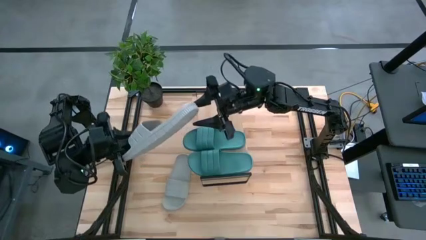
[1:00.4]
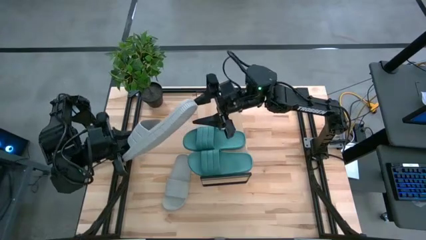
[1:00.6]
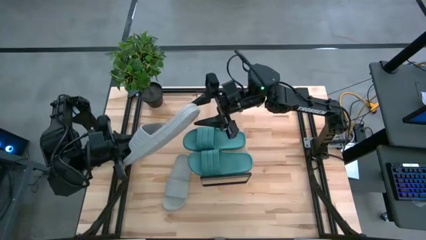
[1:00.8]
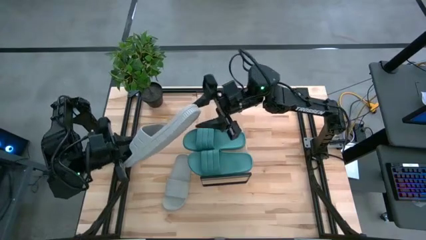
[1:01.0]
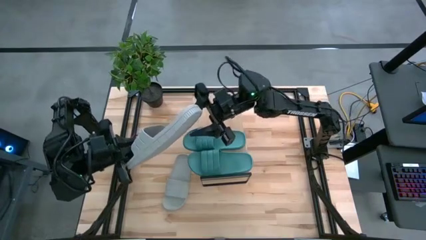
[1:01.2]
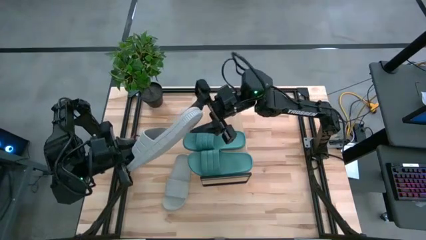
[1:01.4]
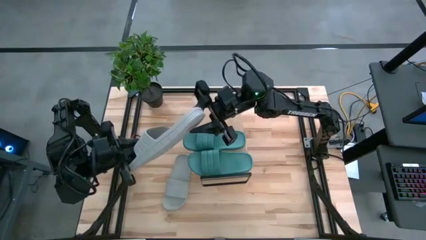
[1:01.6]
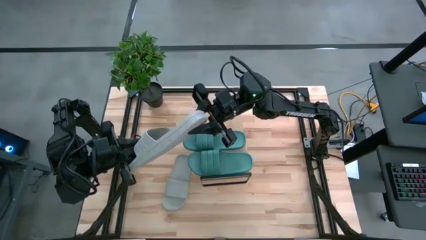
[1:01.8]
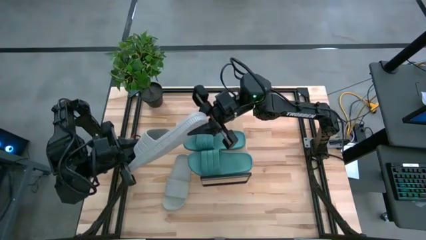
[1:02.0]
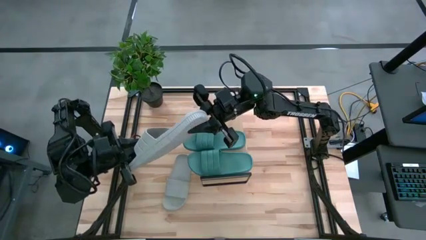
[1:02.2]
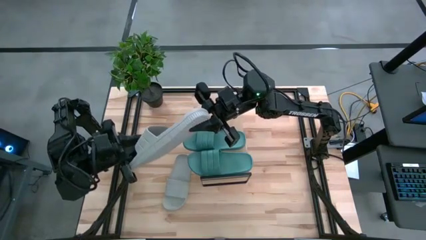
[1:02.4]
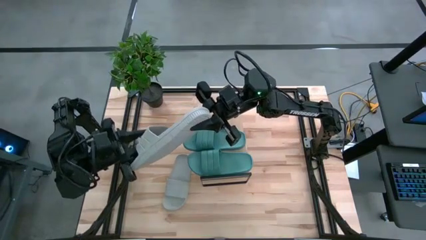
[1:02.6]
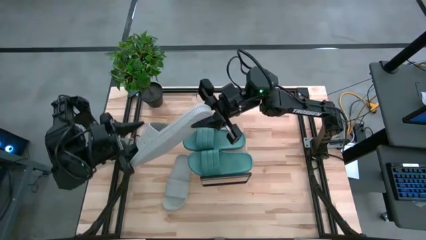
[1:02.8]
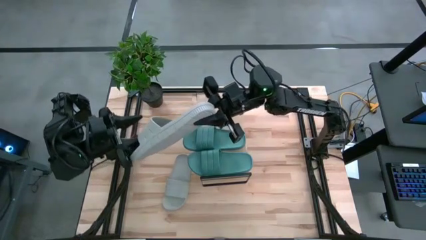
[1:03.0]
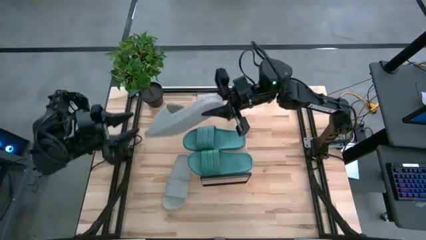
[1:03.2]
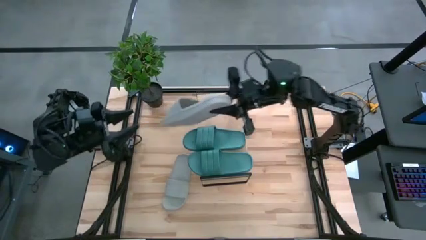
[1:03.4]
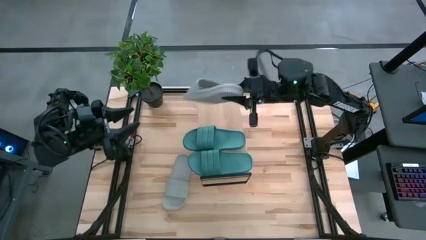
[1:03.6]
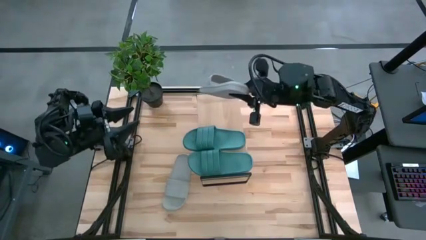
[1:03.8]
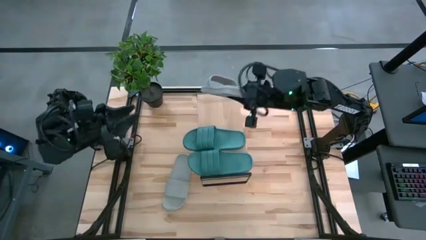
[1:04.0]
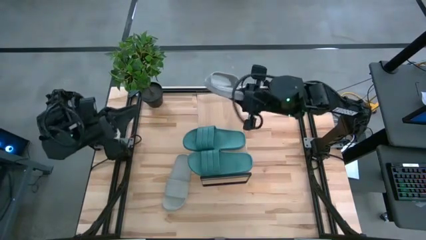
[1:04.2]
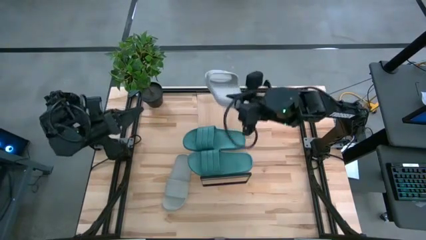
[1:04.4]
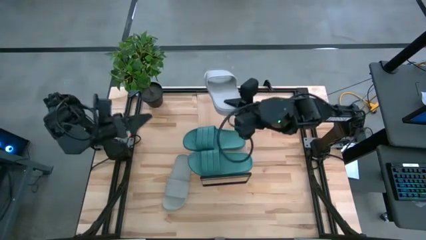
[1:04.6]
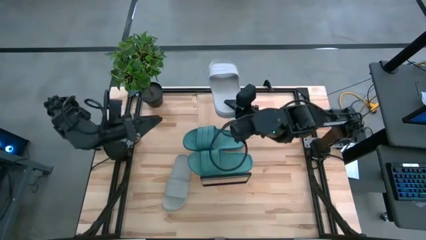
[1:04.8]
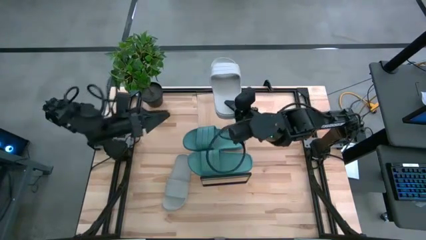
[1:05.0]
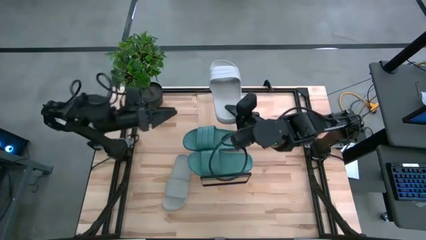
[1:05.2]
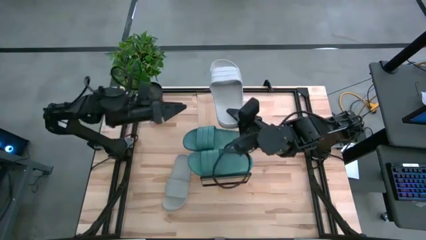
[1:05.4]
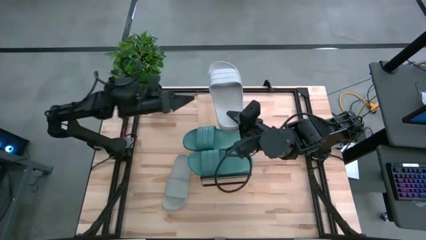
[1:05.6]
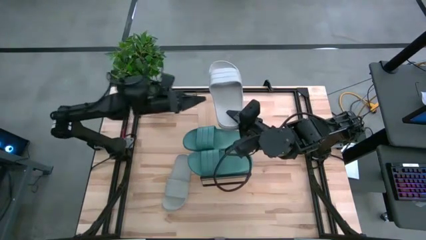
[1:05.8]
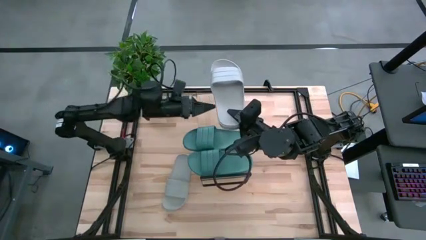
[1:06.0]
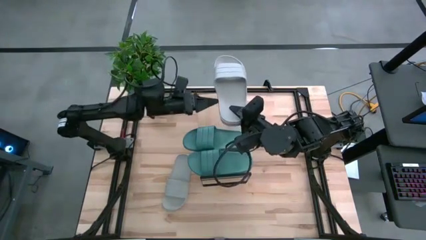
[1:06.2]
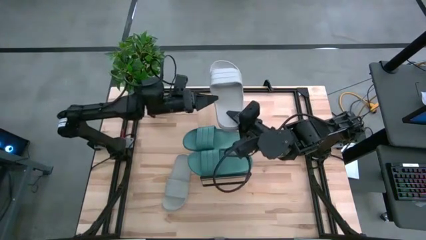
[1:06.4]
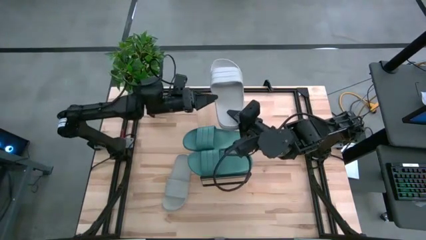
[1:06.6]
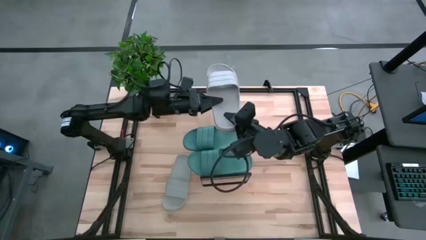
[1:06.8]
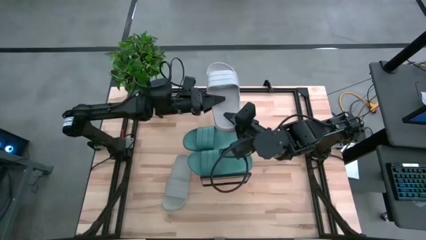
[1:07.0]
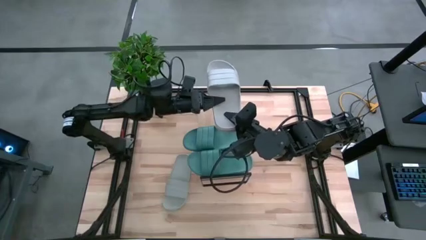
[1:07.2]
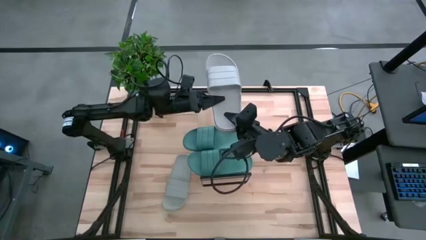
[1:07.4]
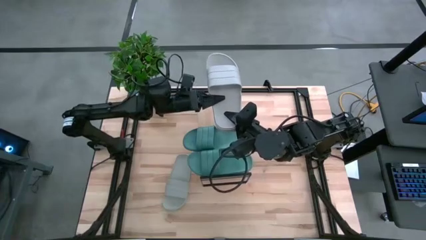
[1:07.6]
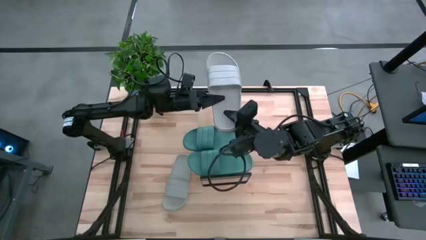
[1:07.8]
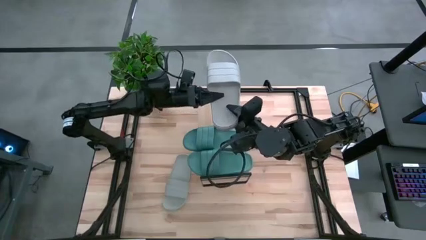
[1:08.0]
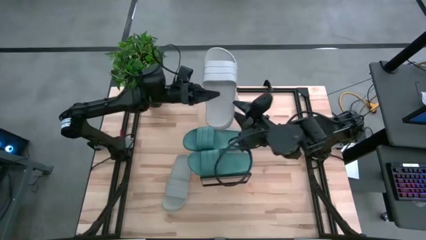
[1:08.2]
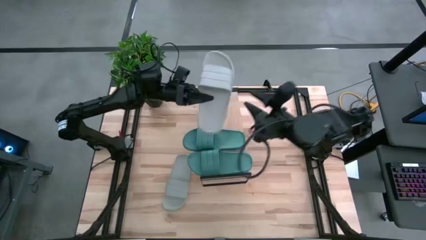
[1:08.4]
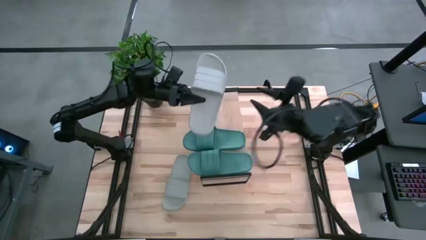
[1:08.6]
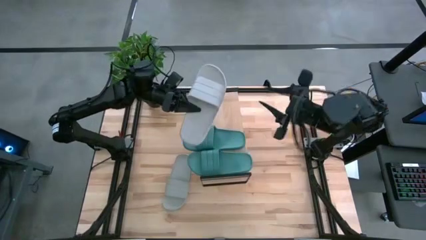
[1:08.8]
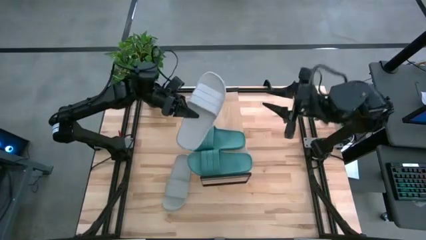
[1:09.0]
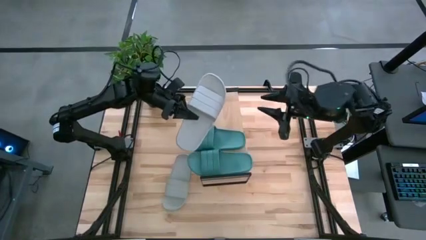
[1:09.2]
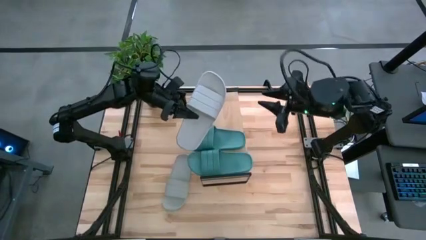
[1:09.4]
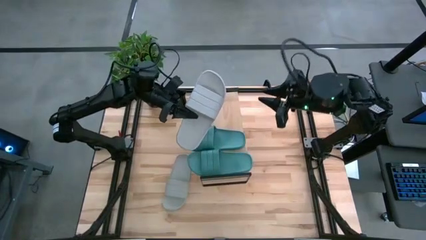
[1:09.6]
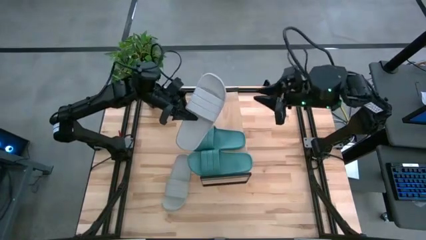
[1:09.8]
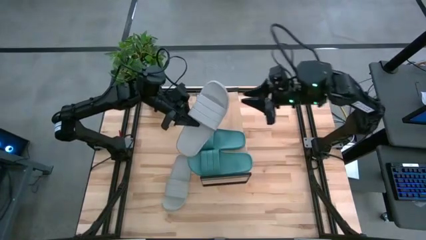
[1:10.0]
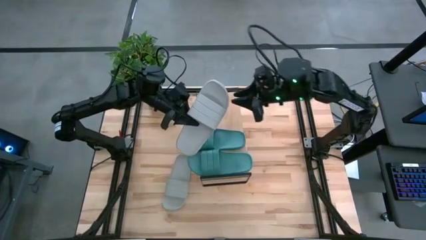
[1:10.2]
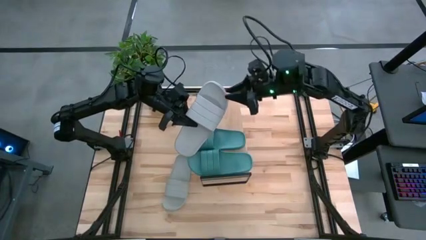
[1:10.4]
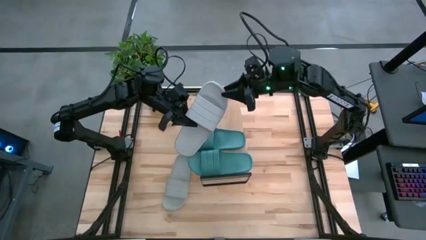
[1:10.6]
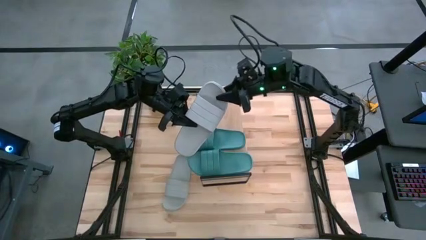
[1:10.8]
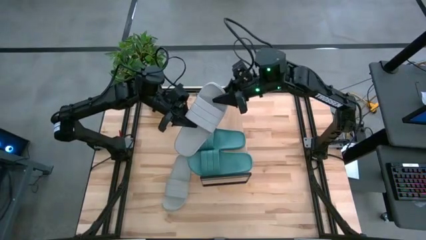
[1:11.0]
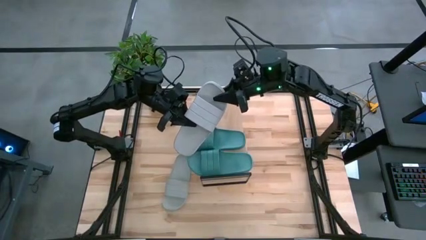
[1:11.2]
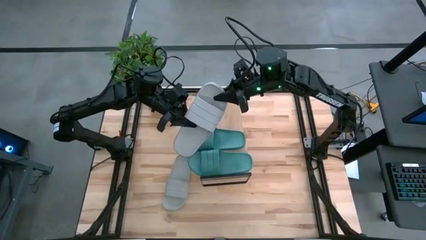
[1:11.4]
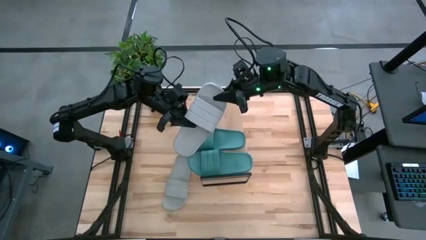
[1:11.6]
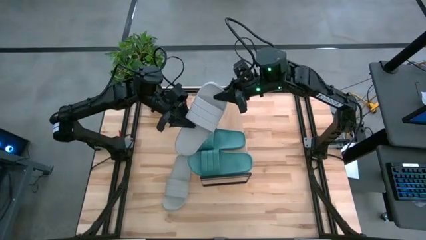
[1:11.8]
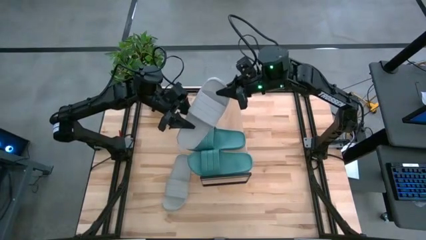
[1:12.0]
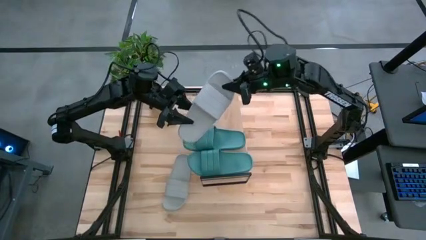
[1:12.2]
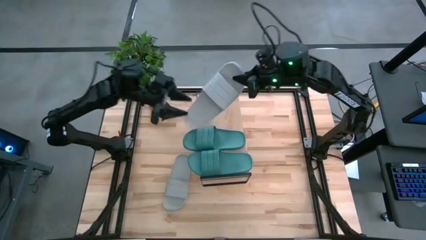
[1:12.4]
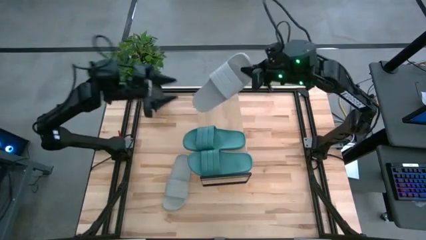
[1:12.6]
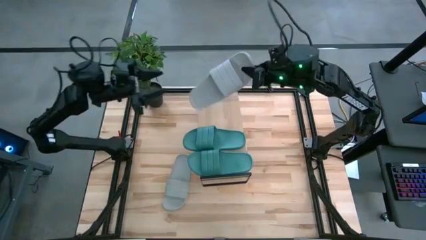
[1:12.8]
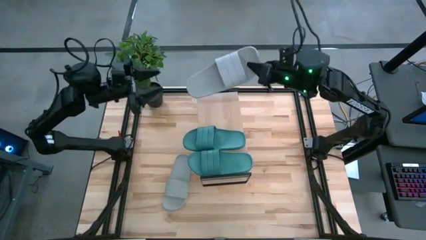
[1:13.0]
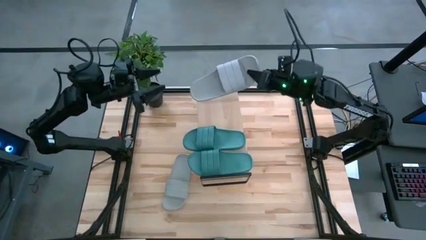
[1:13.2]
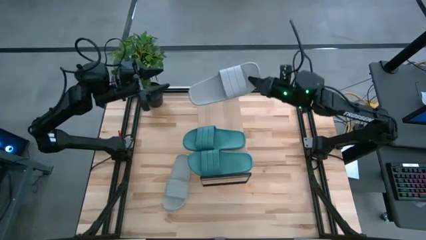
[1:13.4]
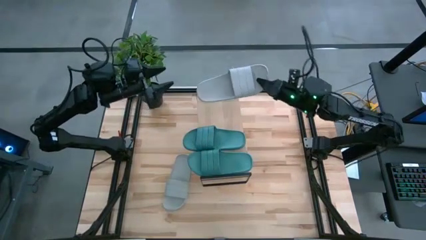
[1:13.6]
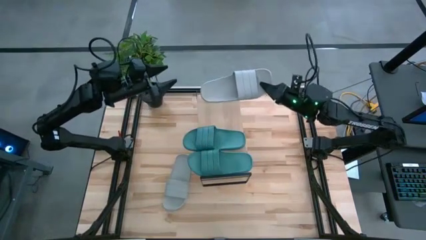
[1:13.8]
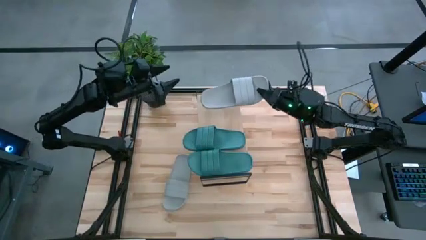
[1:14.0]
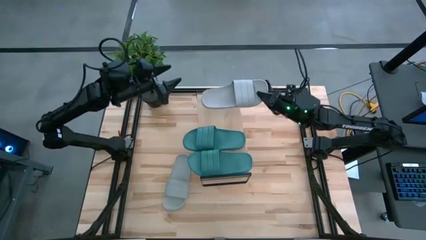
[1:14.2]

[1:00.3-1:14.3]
Task: Pick and place slides into the shelf
Put the left gray slipper on the shelf
